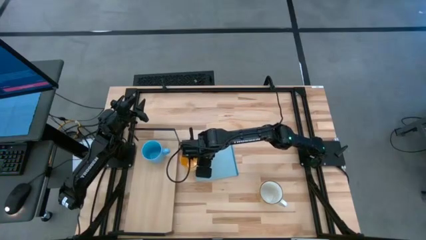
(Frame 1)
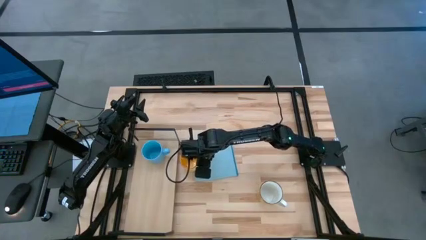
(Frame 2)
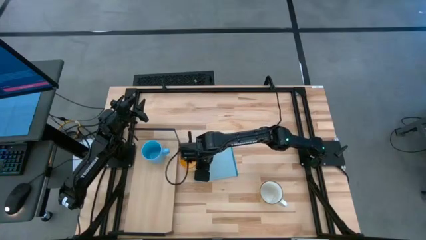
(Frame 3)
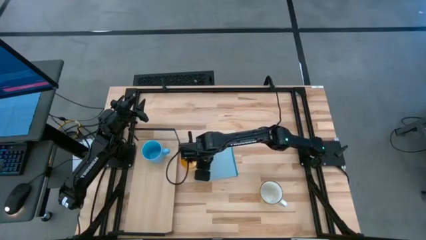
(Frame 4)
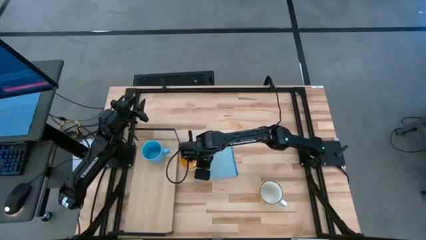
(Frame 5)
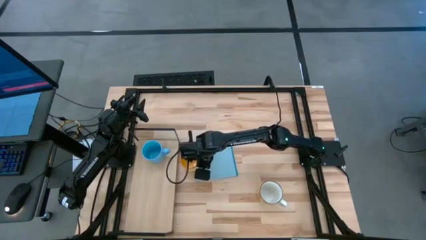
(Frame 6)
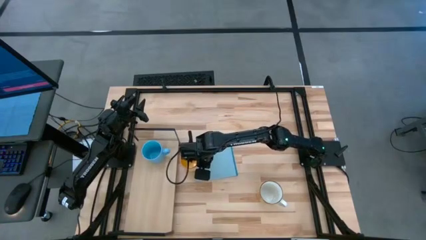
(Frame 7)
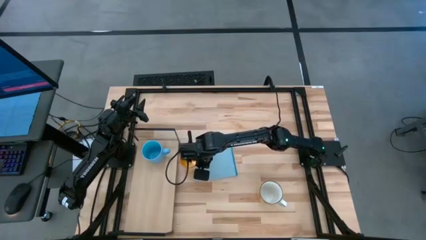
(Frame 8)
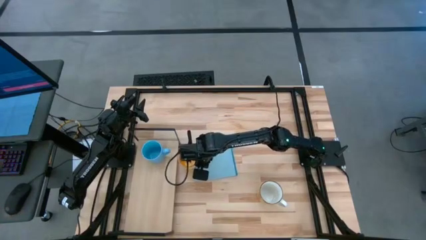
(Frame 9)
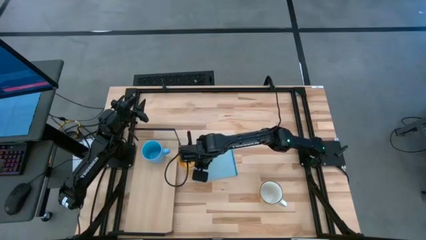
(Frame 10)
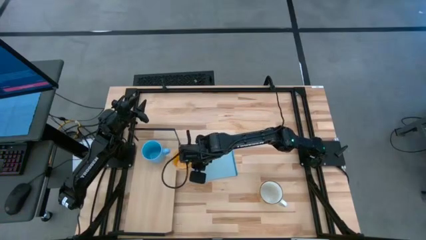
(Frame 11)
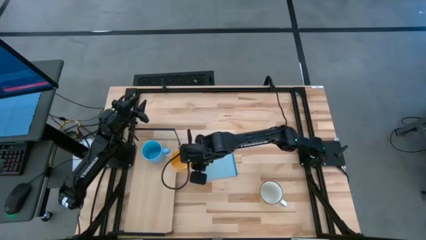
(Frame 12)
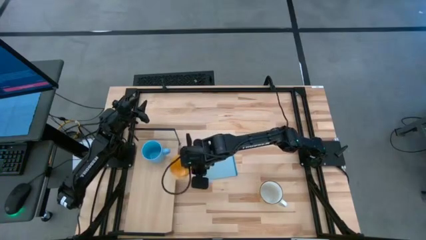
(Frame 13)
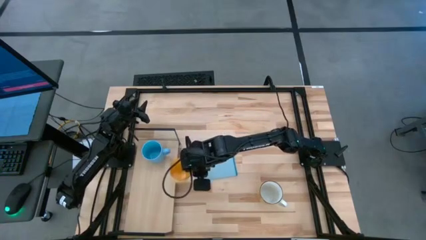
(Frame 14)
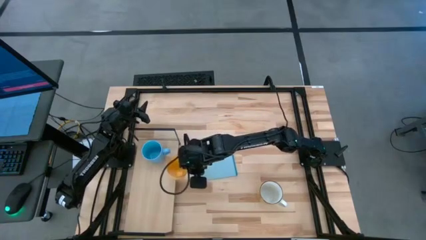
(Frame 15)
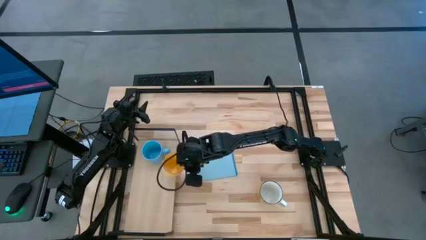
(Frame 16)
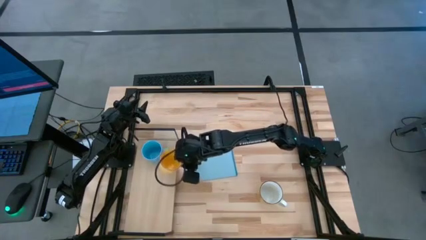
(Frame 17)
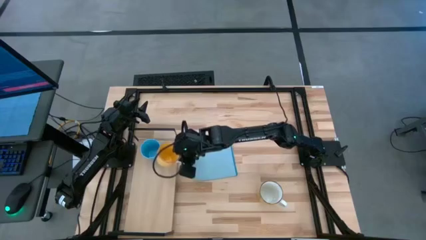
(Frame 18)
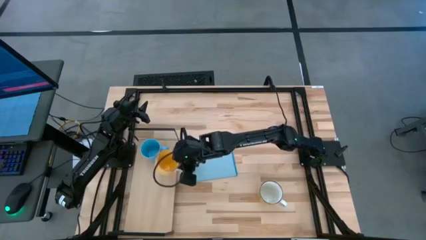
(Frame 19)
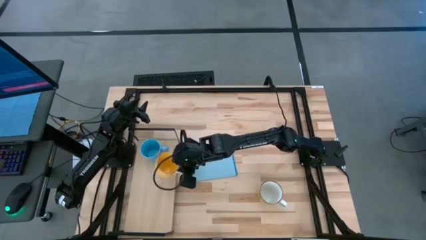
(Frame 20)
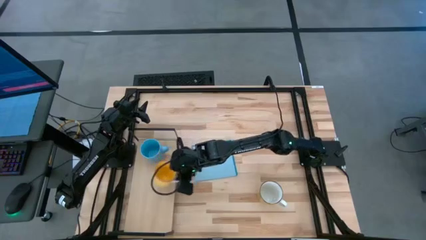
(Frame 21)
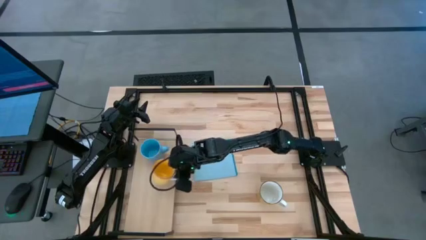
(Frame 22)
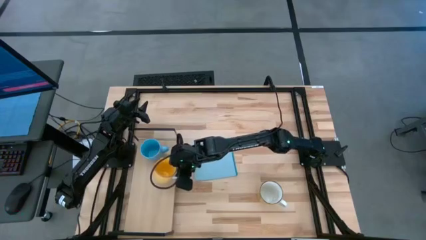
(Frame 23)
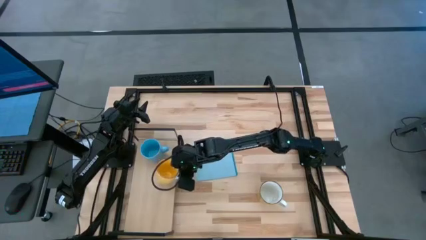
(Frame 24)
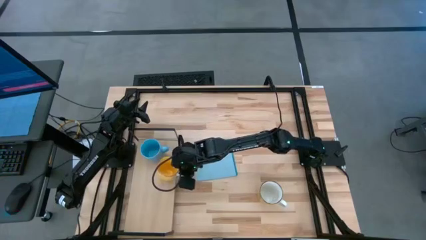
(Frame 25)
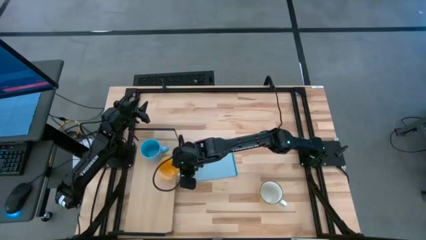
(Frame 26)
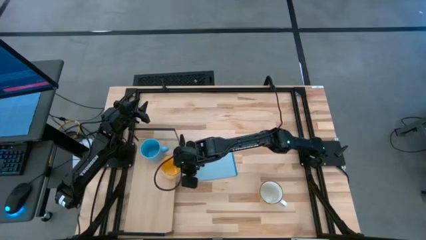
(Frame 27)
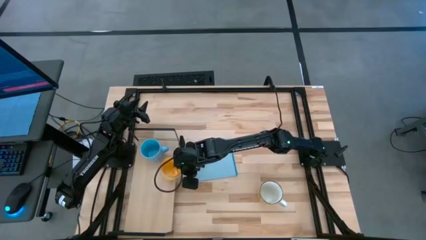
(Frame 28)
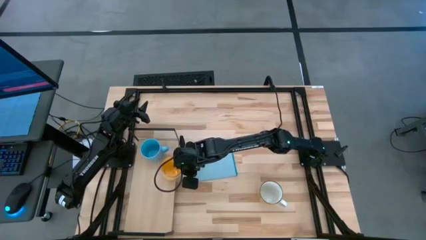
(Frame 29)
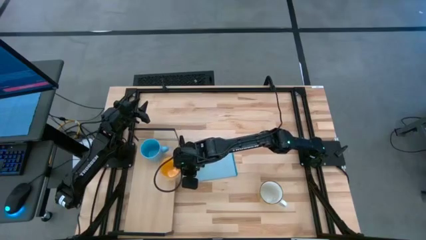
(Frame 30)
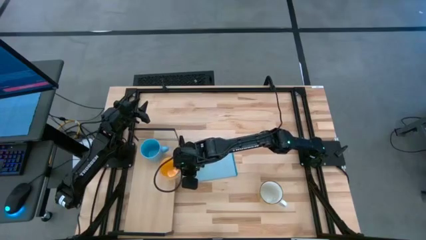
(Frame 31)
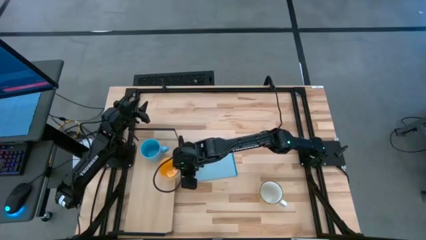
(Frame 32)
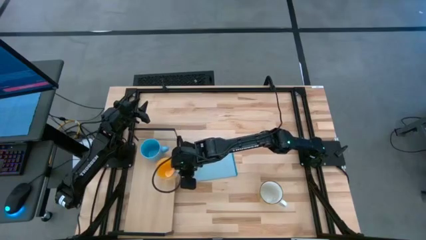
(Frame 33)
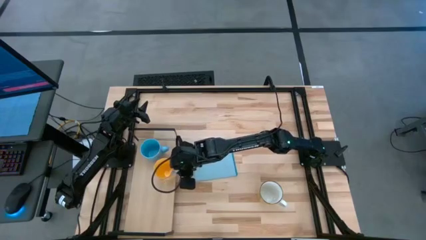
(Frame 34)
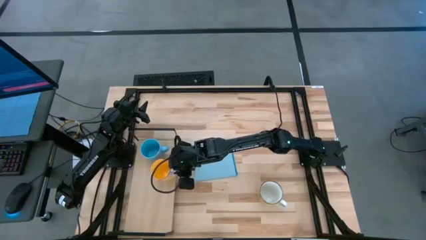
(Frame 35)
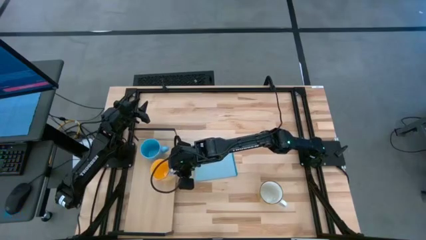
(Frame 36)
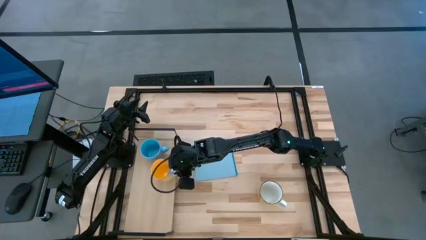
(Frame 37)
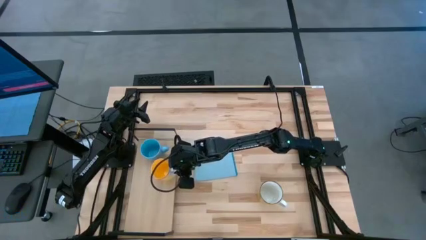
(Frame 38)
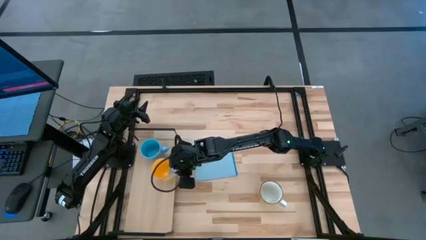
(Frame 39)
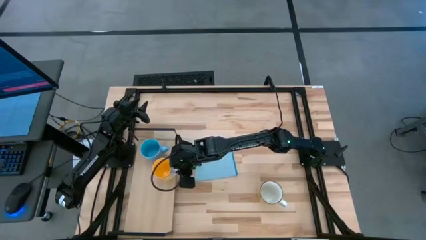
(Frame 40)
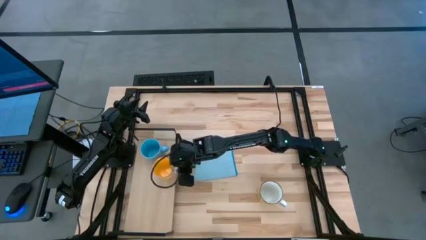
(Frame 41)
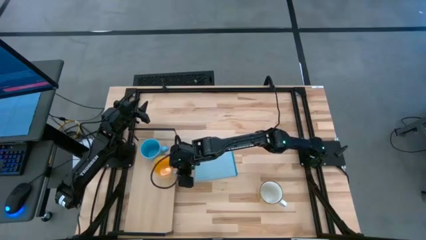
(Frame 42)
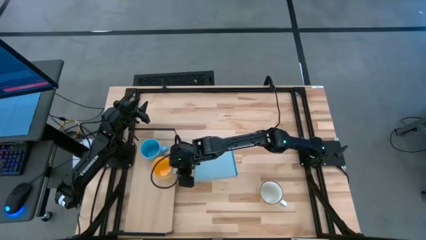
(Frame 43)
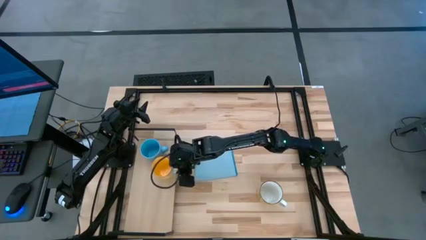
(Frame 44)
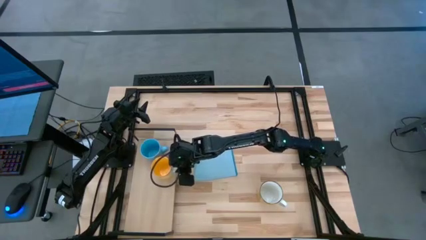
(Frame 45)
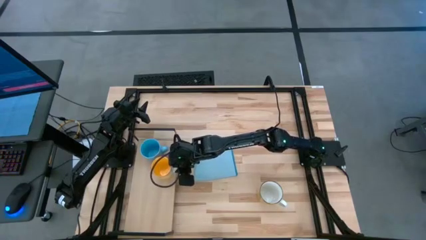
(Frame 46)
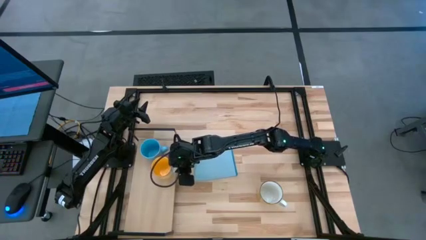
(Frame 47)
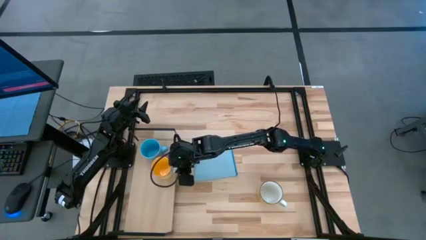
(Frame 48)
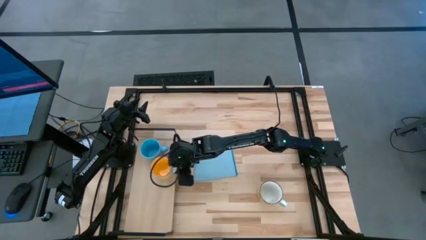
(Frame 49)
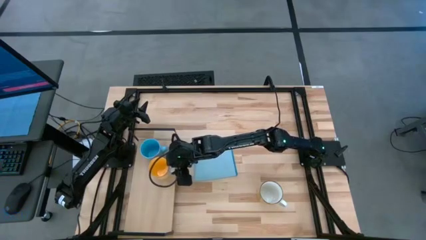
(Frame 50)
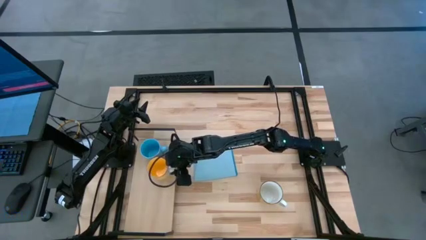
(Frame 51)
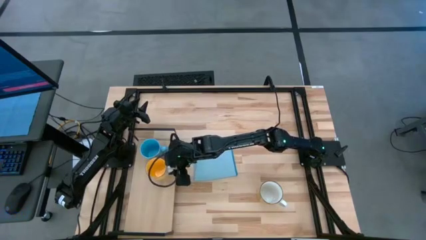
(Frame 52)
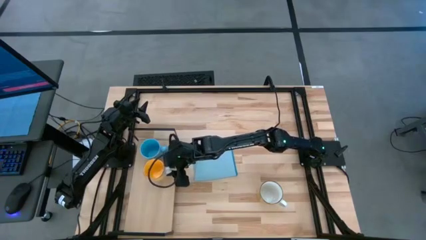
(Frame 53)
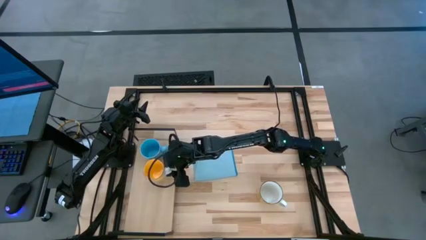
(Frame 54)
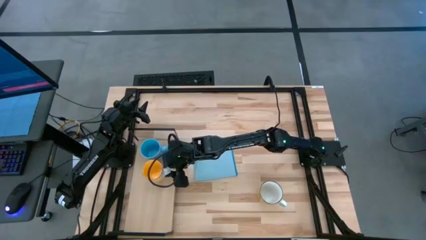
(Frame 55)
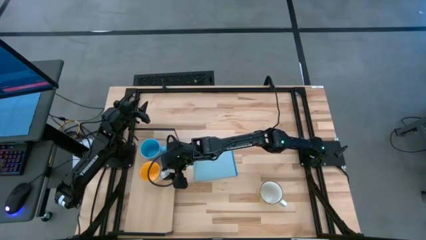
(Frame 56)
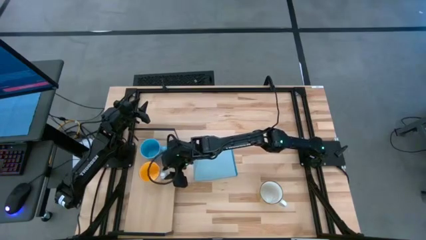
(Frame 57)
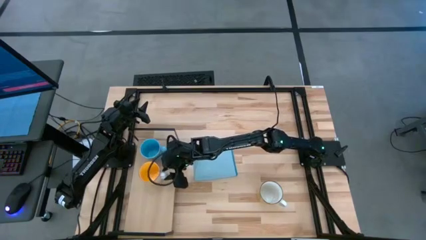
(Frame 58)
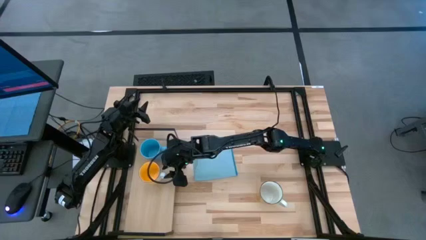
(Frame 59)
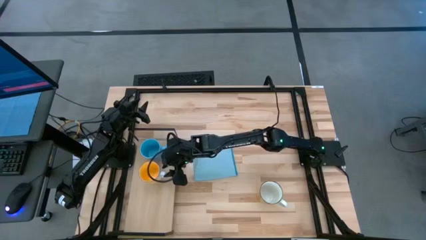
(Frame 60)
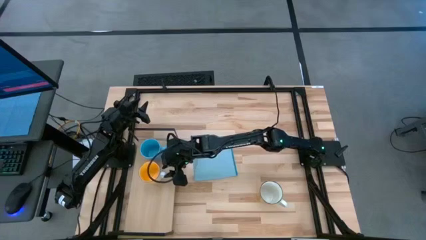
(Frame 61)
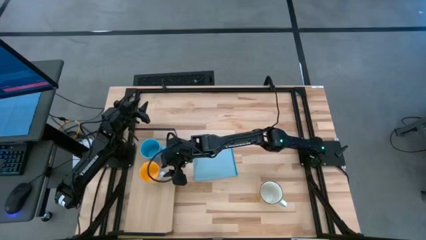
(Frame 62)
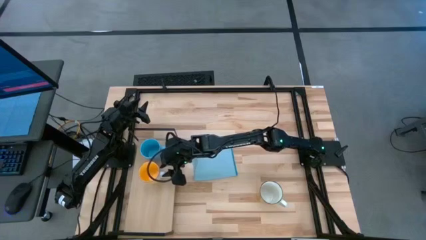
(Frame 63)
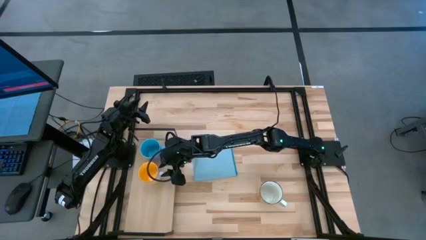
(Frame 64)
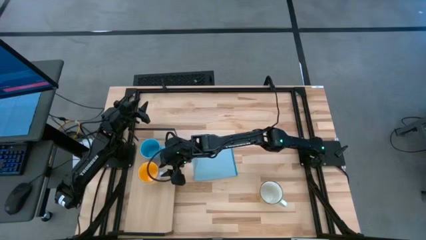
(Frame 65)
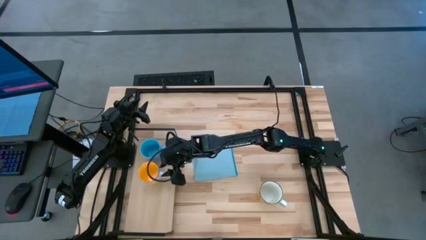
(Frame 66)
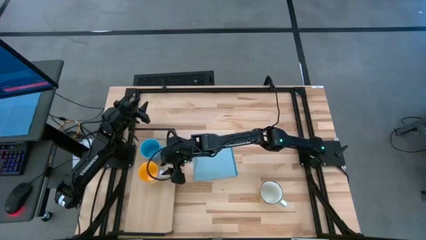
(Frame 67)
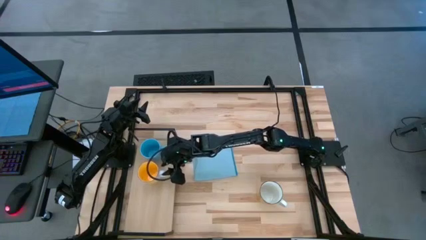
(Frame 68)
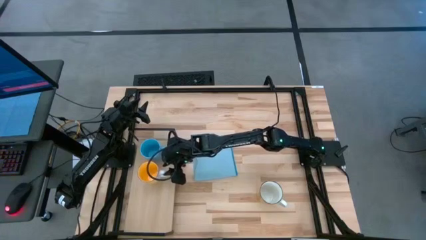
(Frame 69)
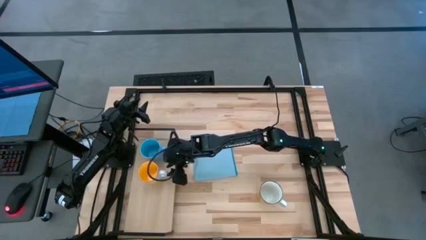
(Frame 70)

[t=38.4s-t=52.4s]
Task: Stack small to large cups/mugs on shelf
Put the yellow mug on the shelf
